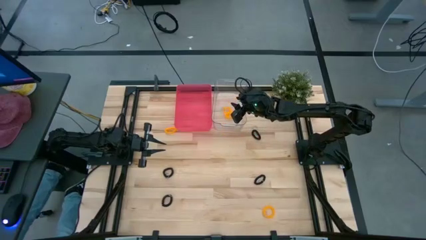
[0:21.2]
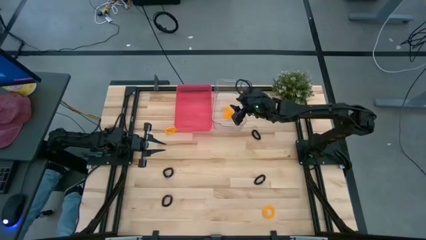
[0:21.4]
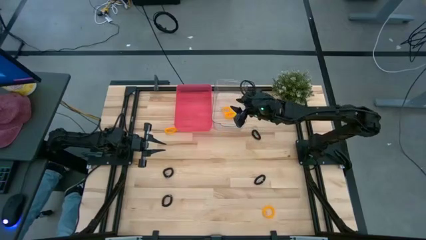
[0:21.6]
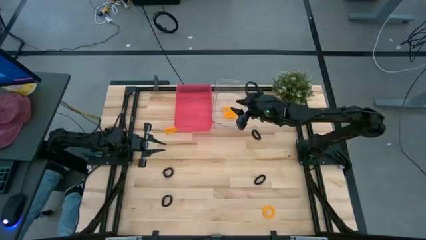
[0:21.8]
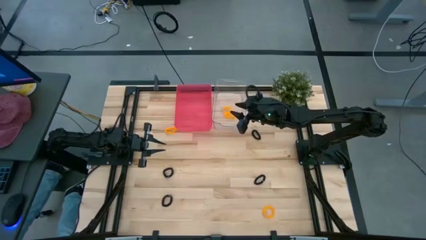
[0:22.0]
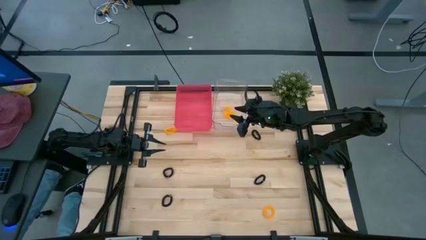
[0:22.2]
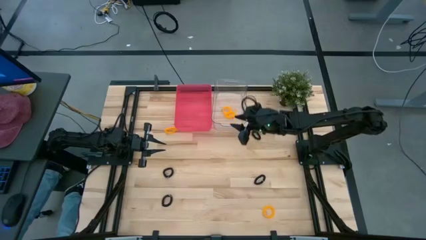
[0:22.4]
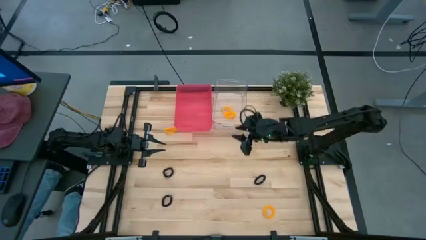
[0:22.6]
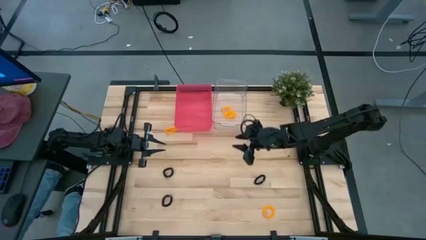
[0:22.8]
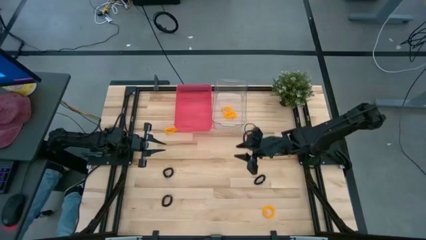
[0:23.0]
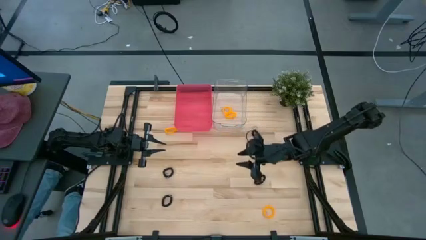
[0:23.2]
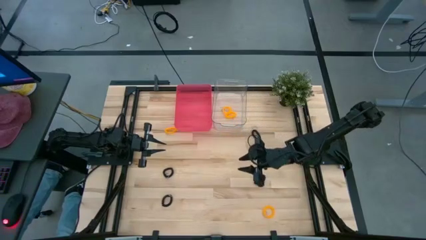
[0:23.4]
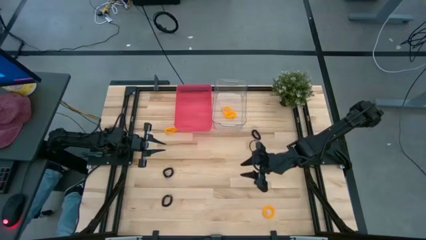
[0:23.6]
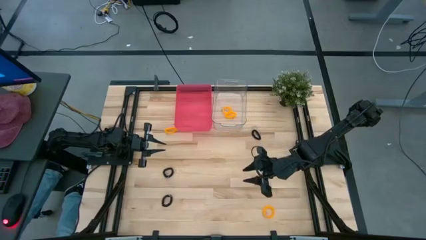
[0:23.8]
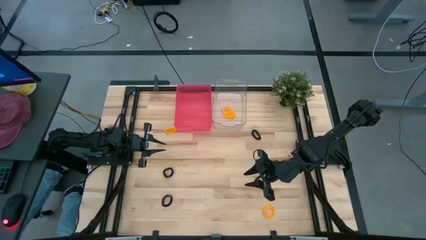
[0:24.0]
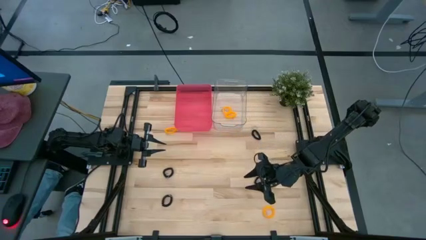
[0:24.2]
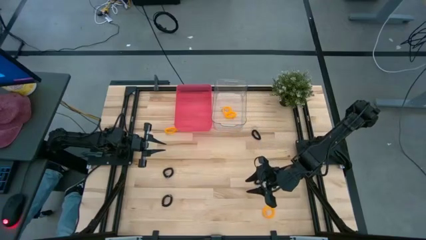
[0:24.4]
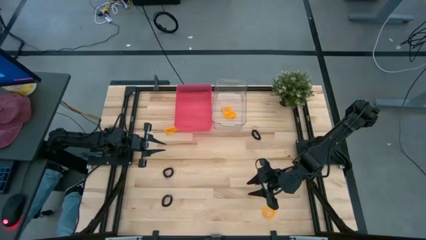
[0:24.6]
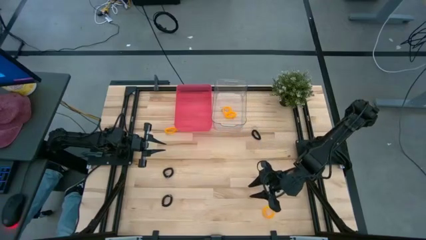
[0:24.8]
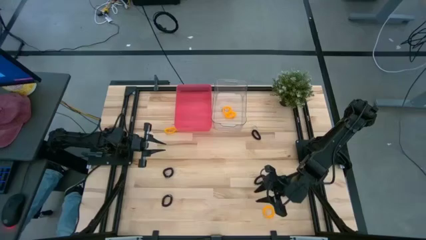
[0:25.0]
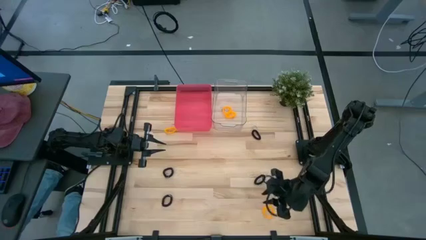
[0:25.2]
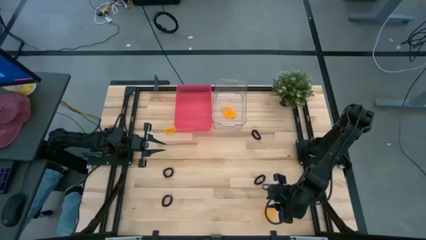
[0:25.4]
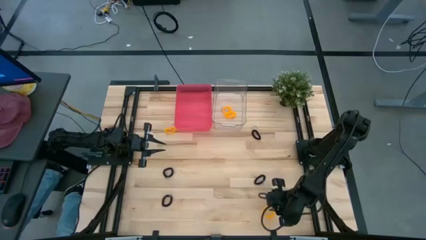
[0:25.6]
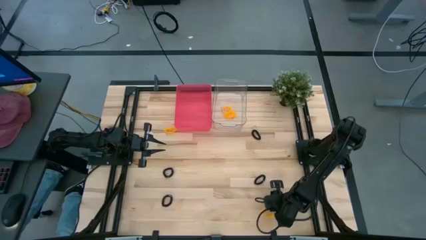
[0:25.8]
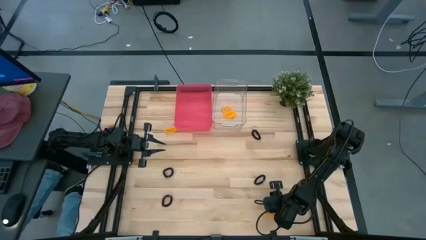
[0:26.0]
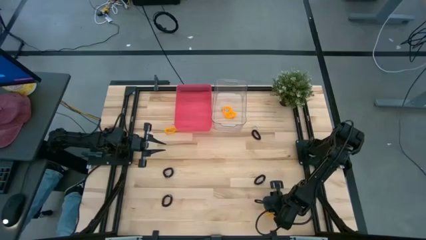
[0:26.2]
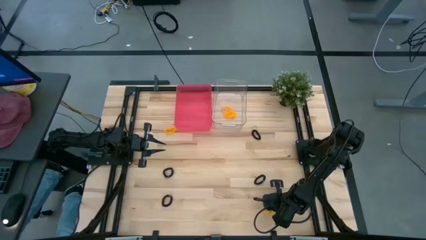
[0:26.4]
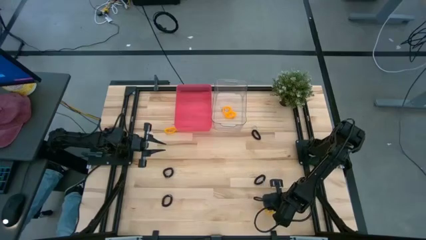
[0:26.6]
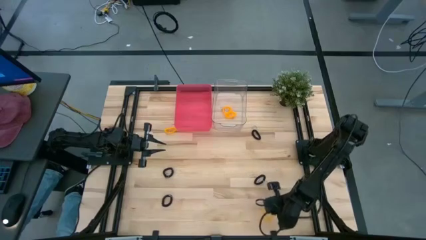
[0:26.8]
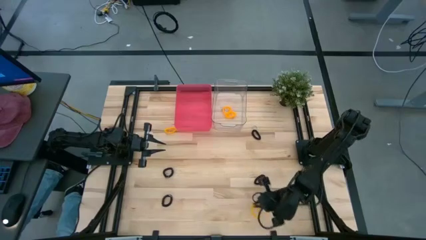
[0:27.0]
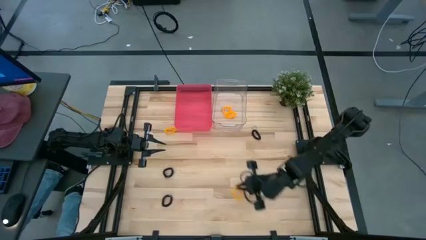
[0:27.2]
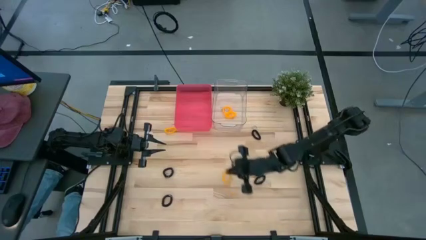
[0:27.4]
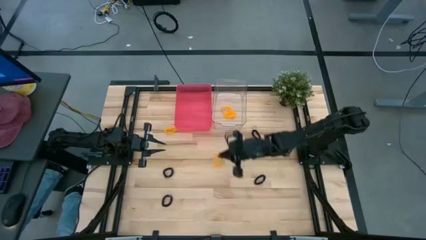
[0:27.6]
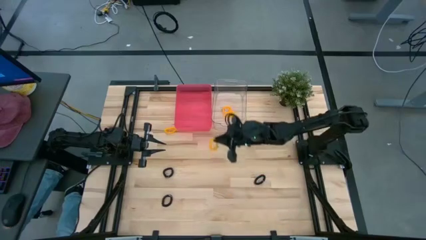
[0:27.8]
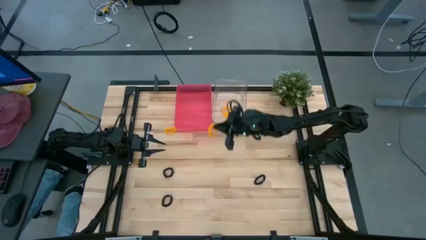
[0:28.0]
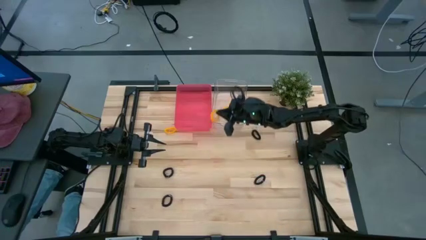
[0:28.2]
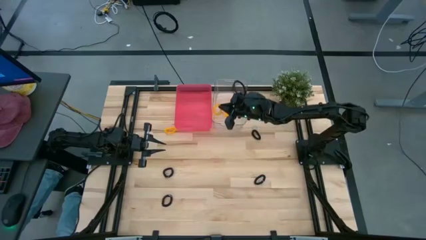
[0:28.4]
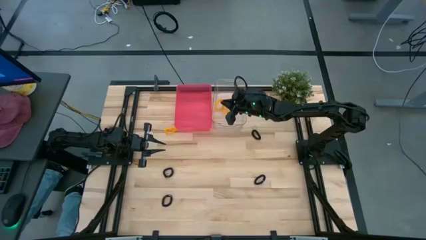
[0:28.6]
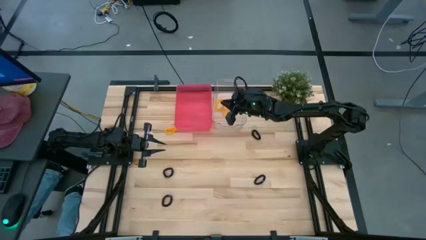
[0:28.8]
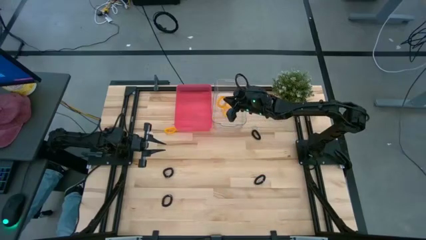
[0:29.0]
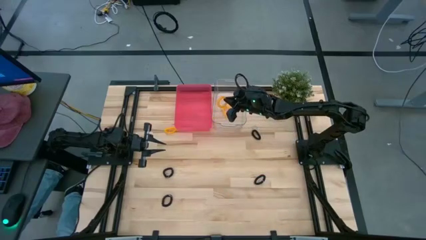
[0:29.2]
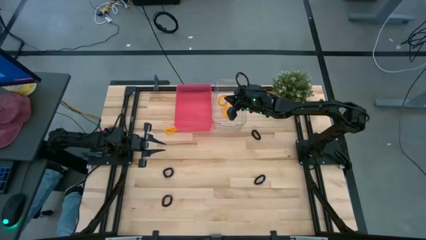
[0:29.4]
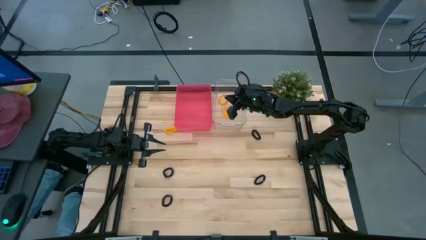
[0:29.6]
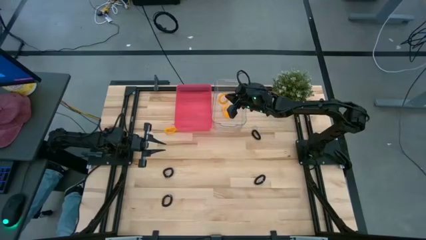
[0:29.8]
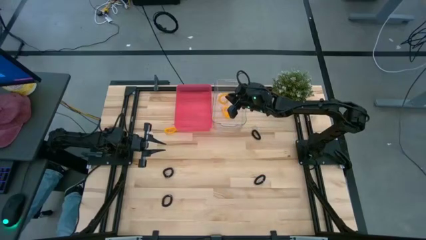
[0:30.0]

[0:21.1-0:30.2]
Task: Sort spring keychains
Put the yellow spring keychain into the transparent bin

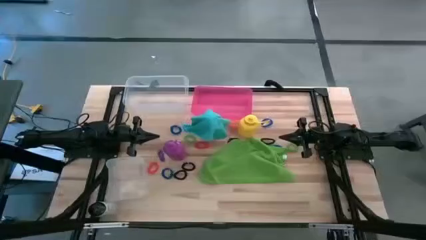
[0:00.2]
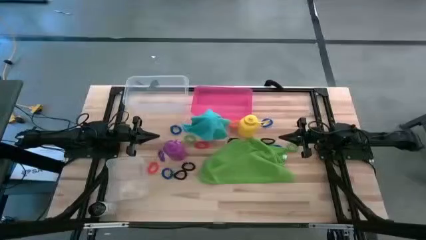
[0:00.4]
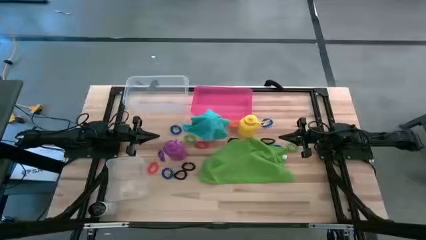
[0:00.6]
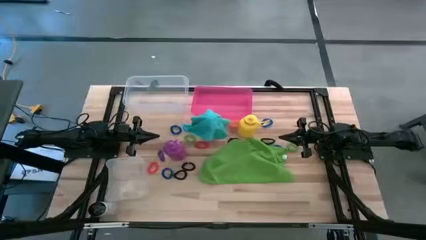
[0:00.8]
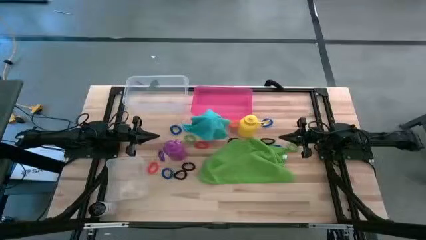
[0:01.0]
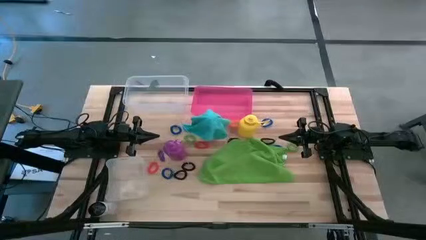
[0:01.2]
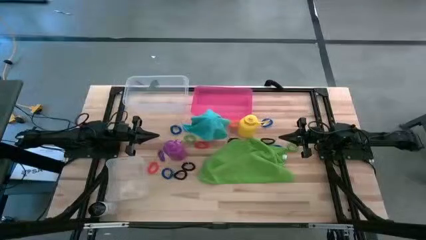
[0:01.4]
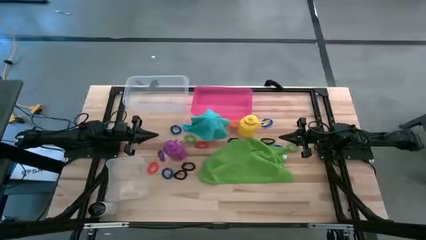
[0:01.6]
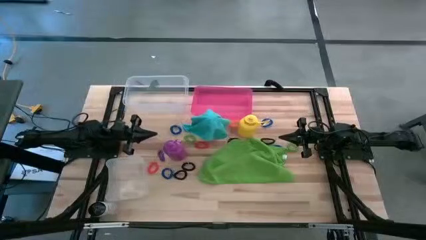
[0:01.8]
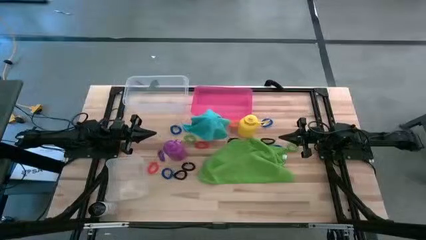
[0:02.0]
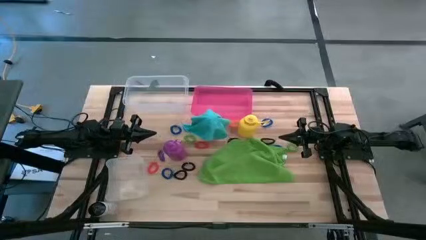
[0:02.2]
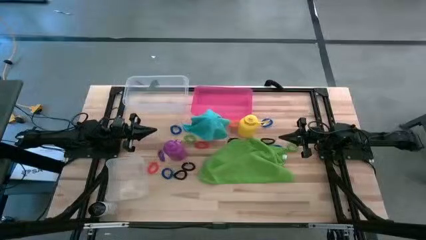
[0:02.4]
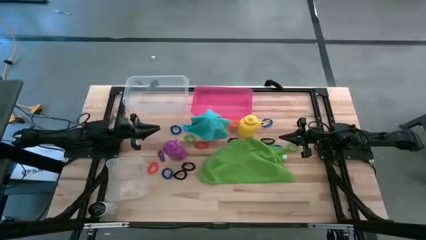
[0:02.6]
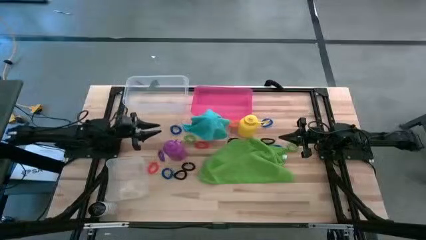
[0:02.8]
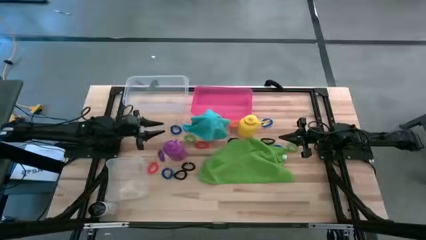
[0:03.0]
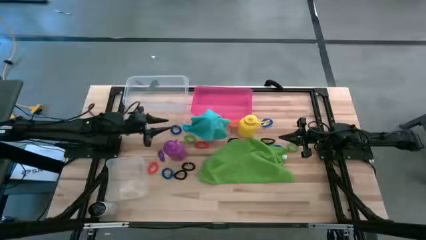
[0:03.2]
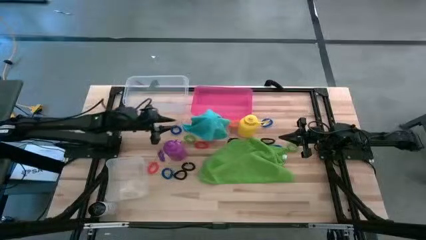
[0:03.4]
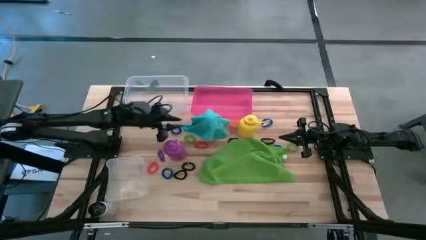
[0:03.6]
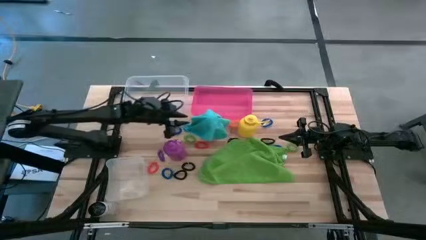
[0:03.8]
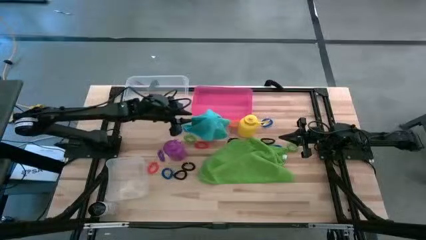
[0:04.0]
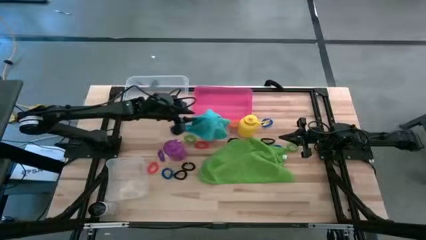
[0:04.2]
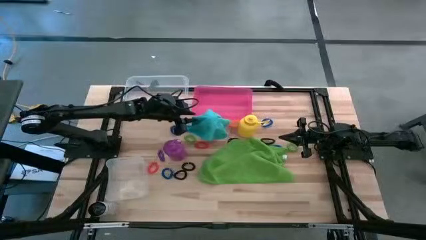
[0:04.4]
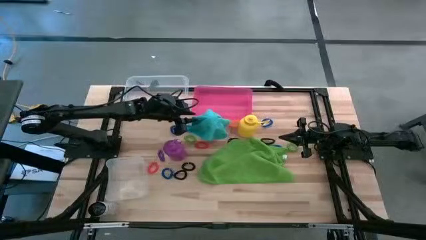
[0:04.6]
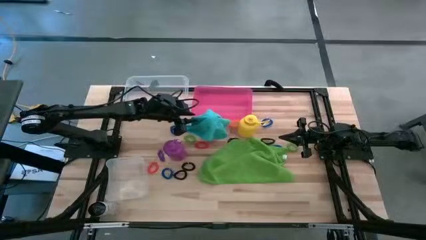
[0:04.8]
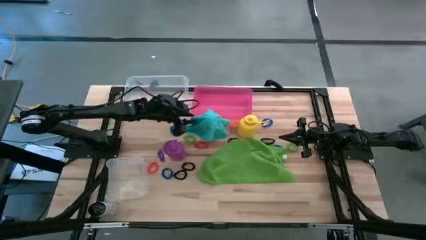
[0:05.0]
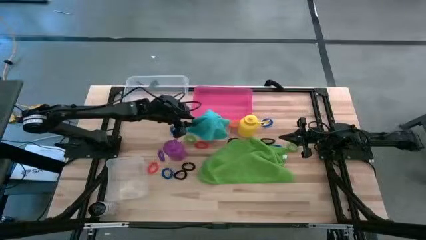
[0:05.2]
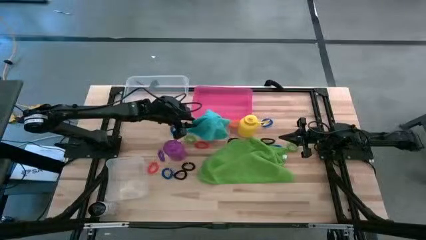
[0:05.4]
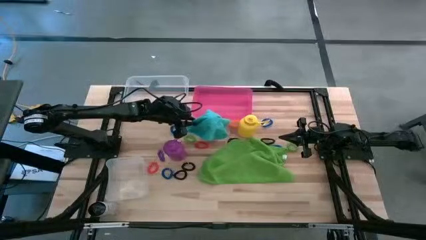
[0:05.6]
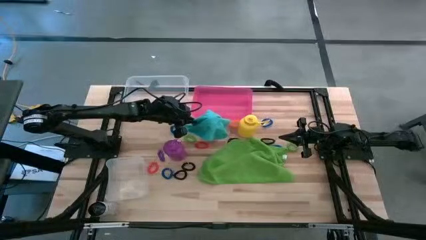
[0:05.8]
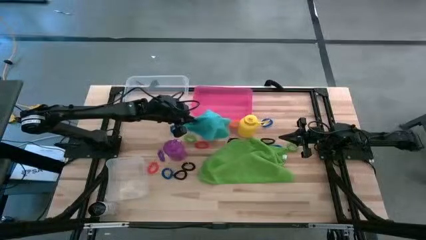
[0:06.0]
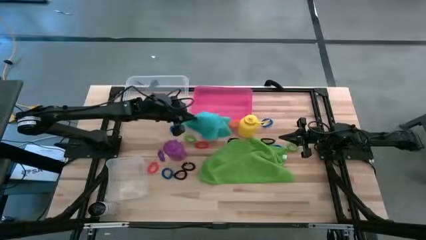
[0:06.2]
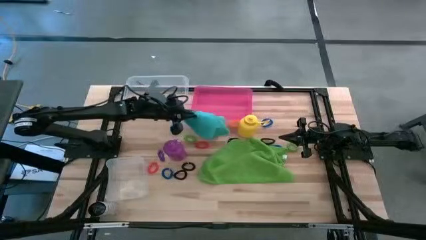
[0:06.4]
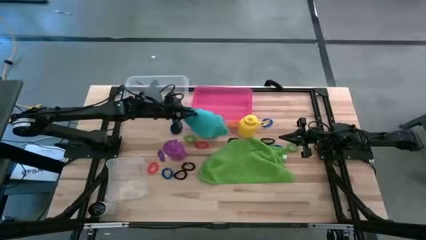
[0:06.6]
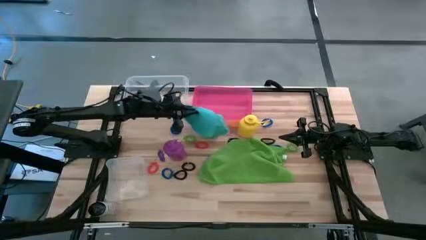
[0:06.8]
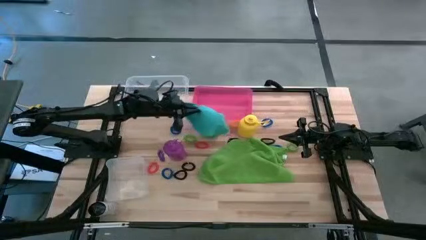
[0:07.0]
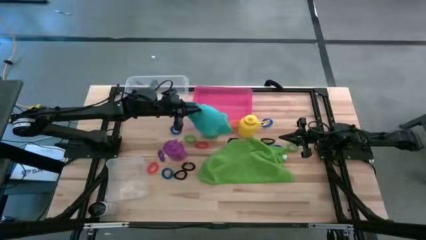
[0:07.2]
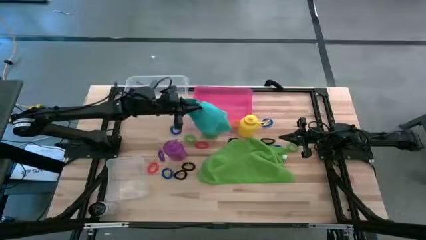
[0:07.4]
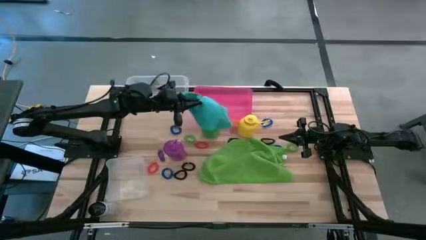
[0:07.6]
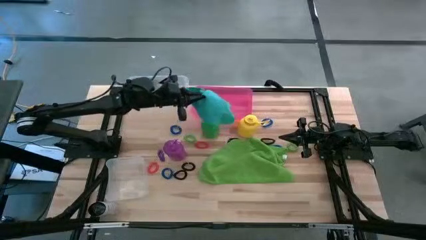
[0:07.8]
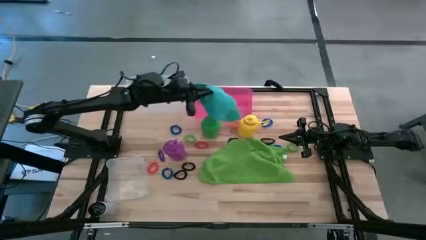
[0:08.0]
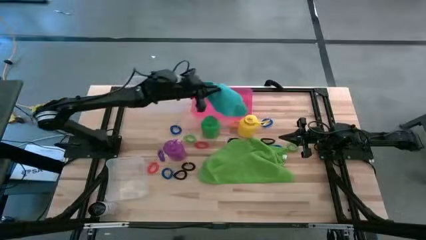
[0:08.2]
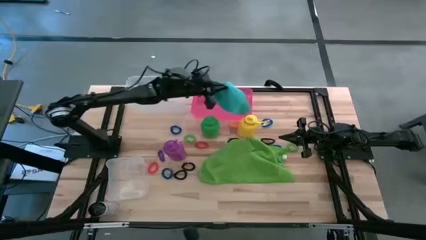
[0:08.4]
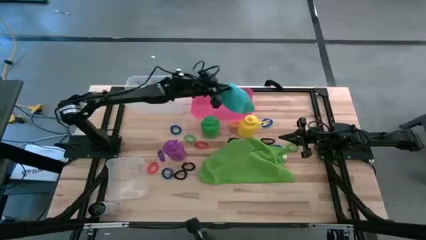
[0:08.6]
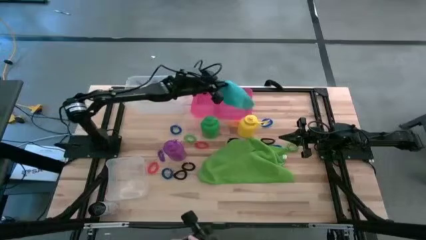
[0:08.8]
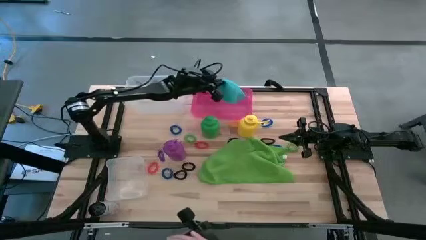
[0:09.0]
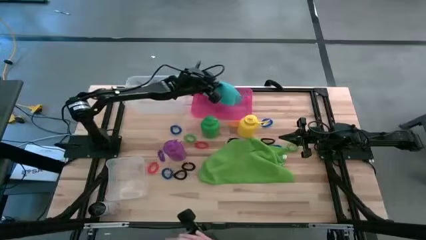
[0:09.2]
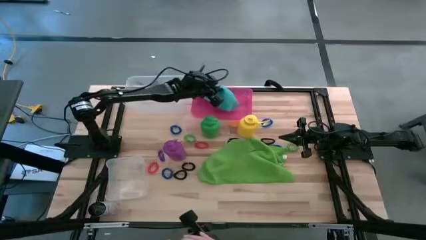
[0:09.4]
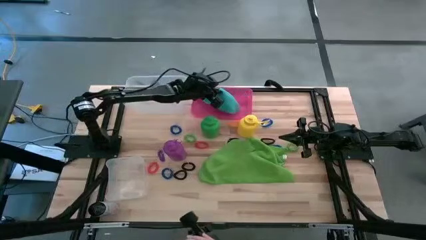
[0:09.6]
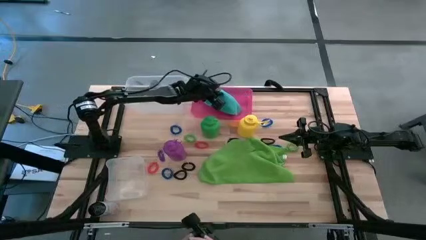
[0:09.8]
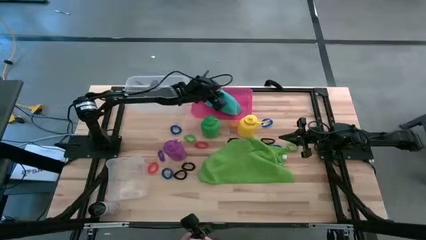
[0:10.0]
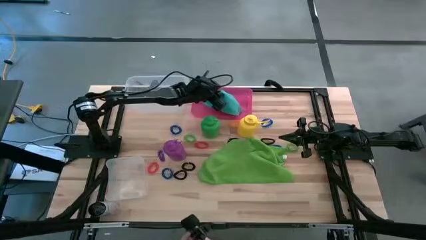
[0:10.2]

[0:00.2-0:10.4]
Task: Pick & Place Sports Items
Put the blue towel into the pink bin
